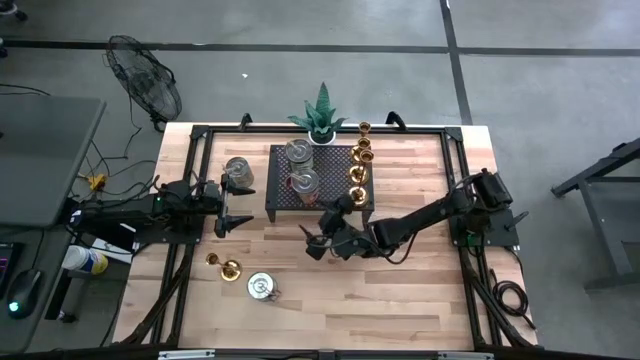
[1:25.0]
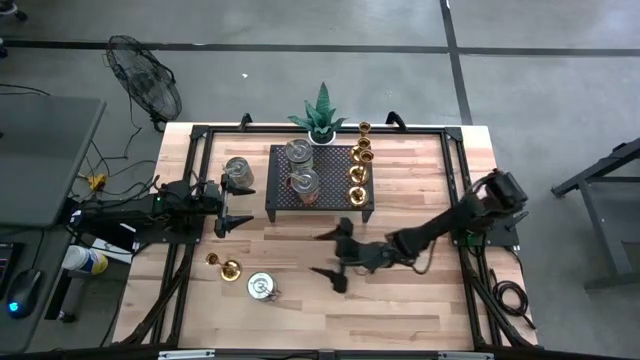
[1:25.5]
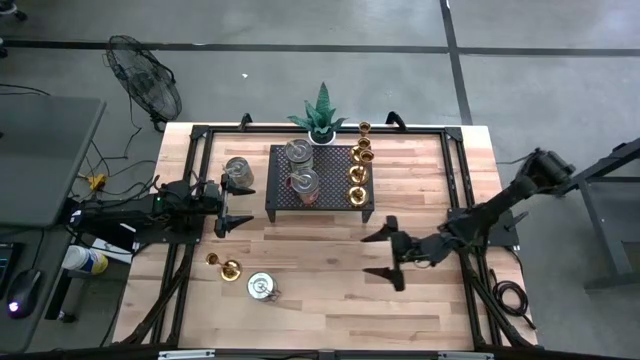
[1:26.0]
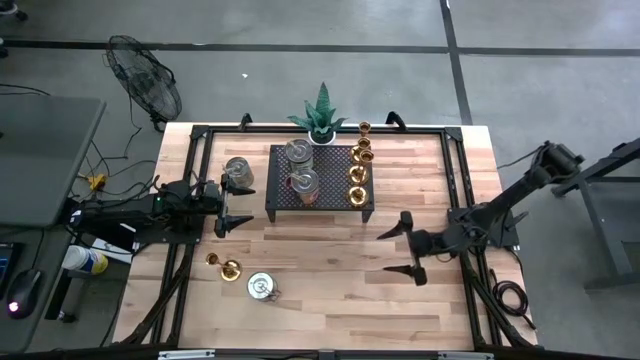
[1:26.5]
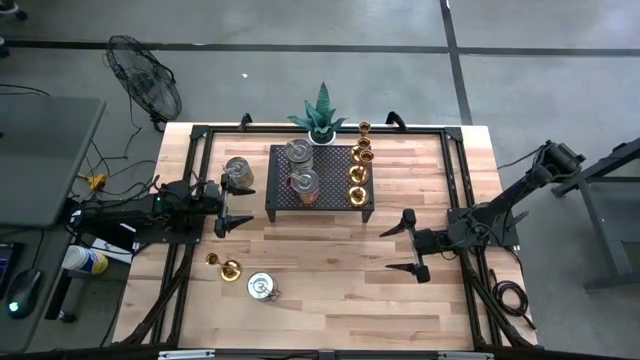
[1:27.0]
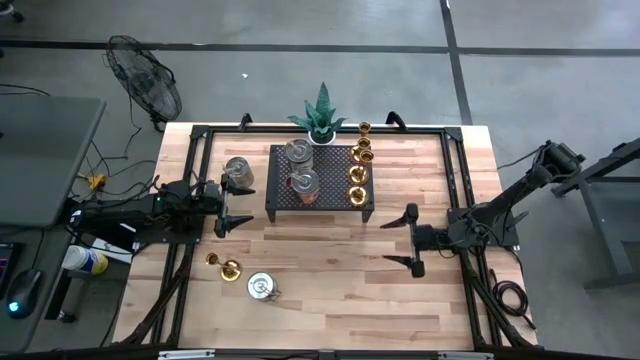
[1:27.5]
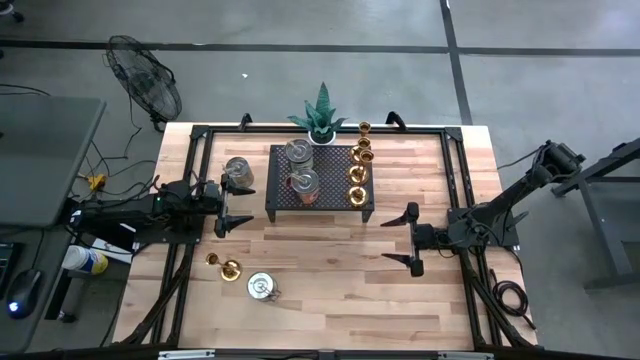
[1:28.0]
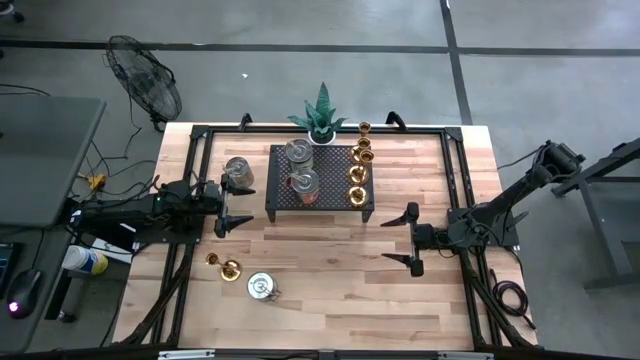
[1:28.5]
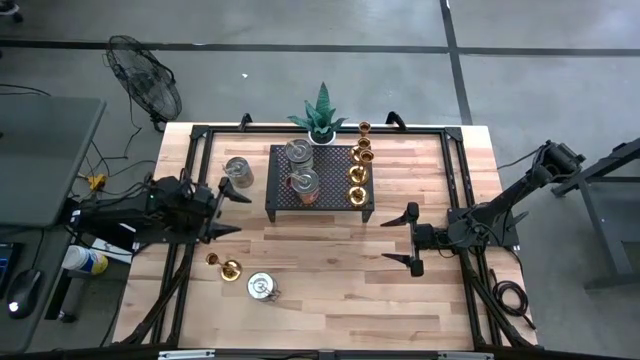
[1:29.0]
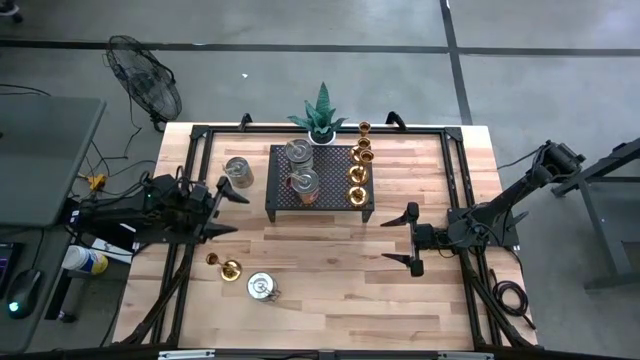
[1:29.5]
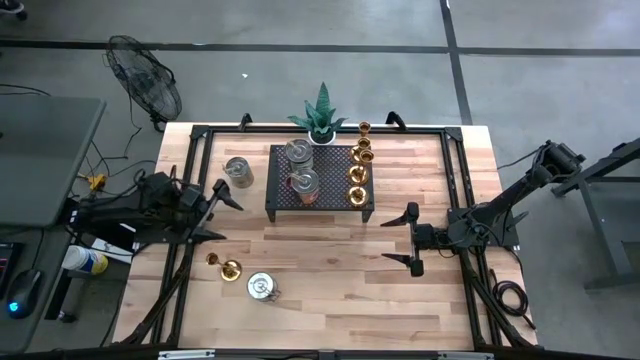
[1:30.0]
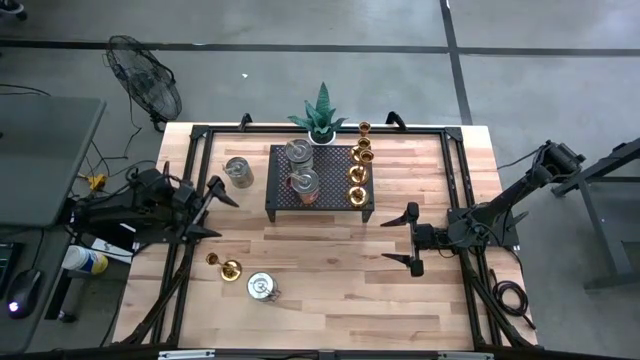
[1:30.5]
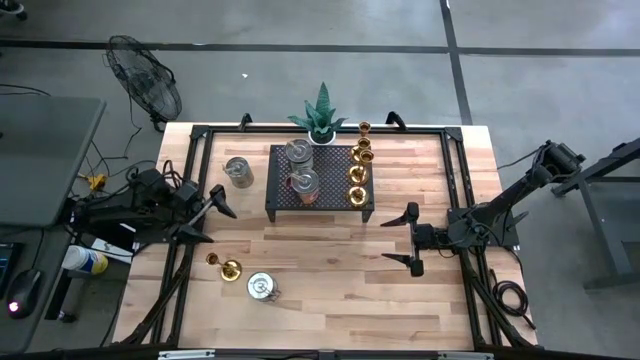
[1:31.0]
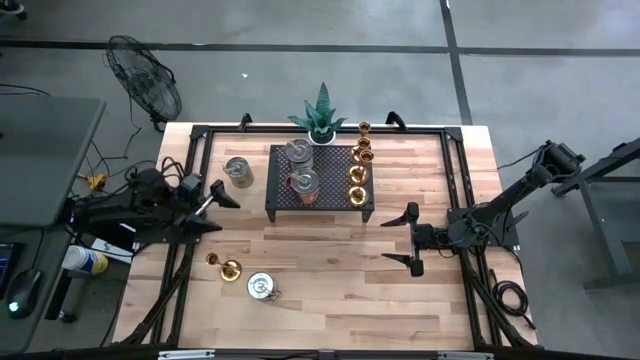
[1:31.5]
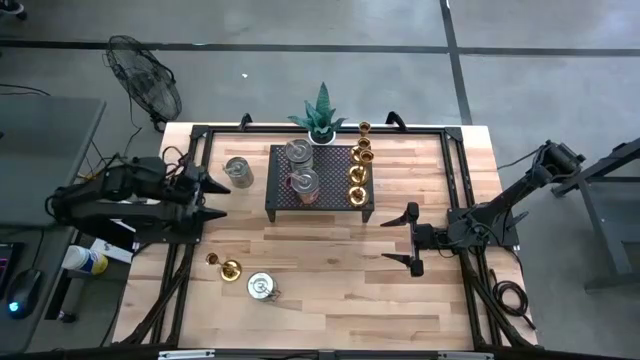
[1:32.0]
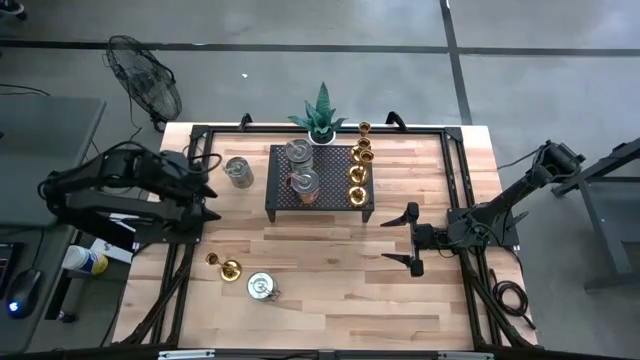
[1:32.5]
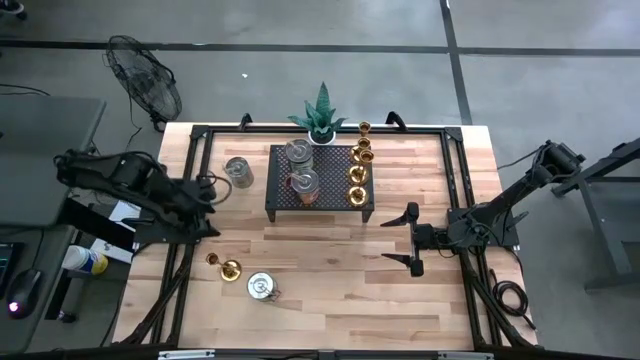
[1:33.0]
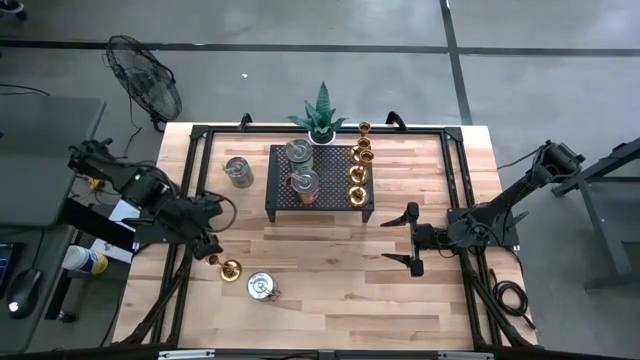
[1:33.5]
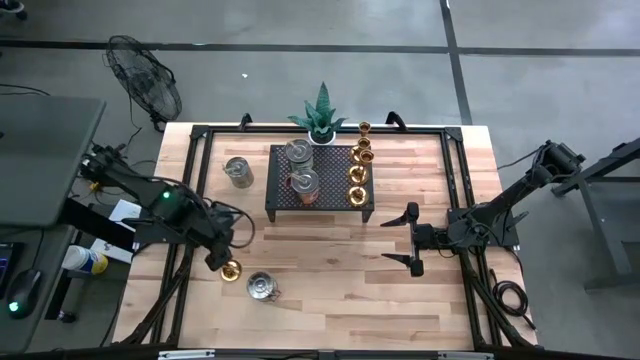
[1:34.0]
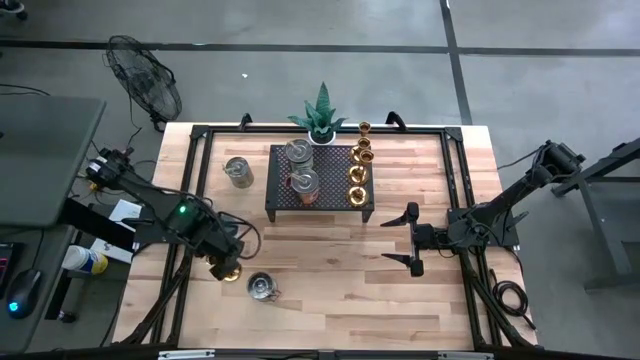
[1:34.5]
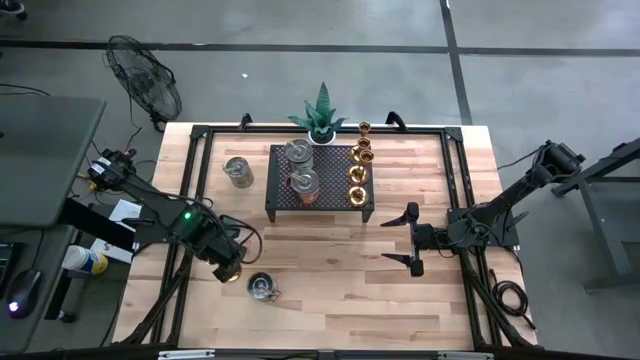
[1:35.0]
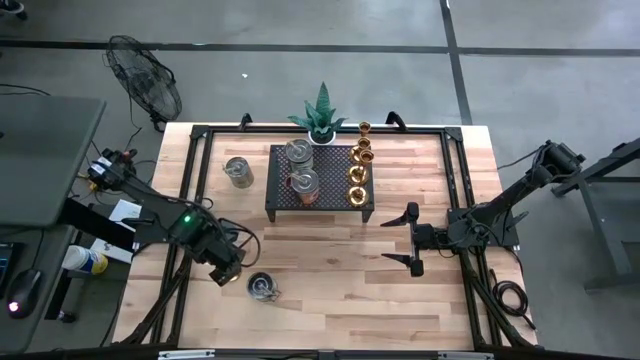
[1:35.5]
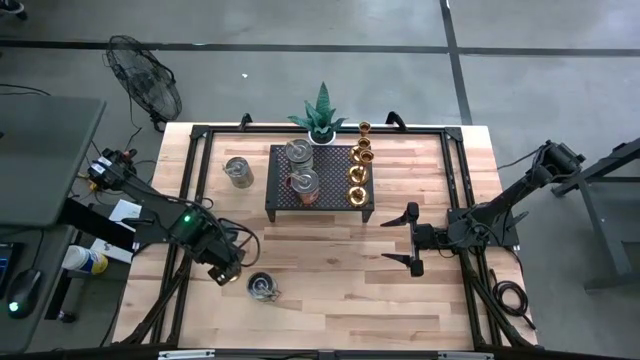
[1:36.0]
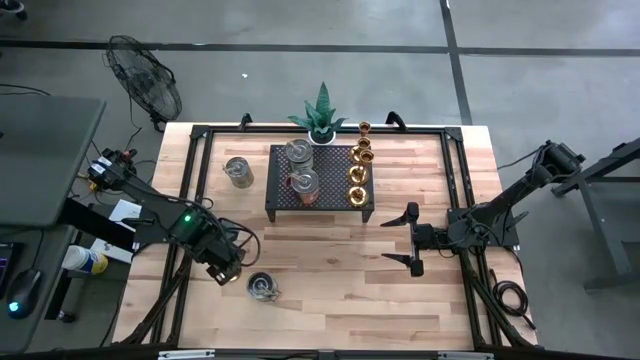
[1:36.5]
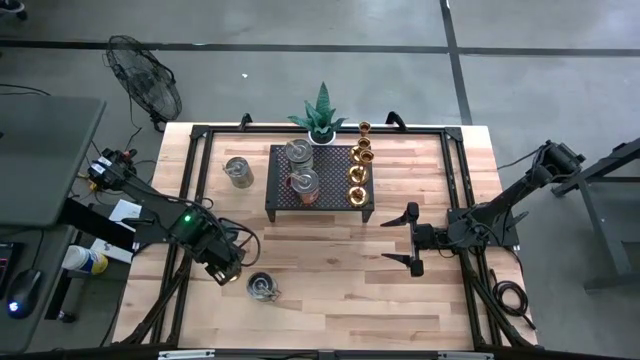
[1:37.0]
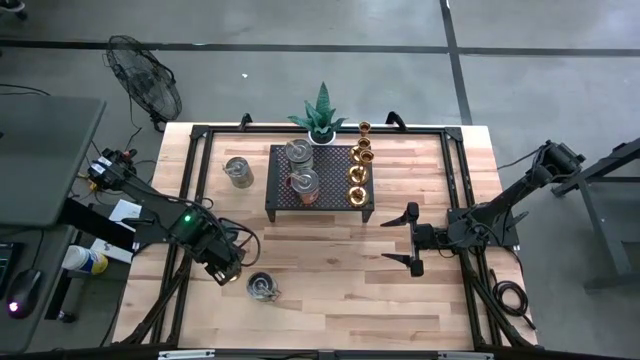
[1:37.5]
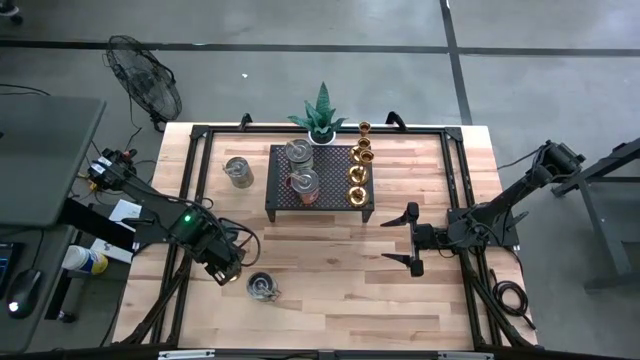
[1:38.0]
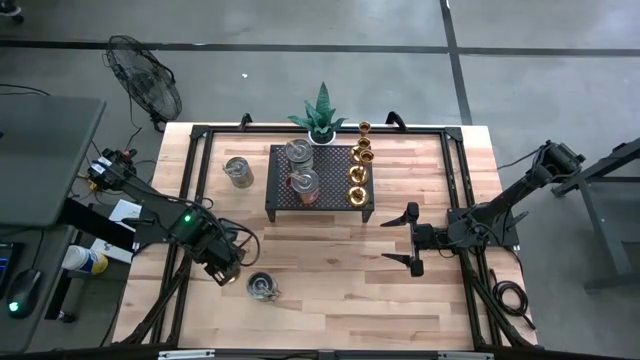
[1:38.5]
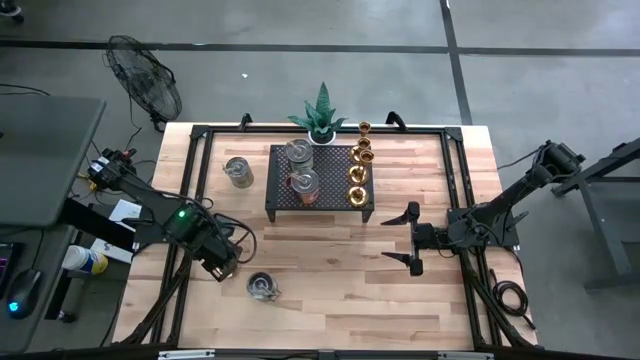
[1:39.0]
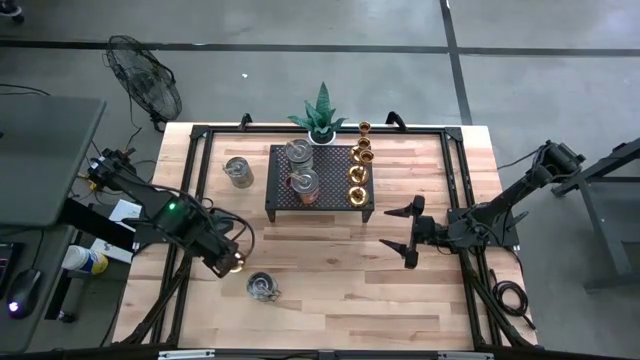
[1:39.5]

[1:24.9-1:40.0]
Task: Pick & Place candle stick holders
Put the gold candle holder on the shelf

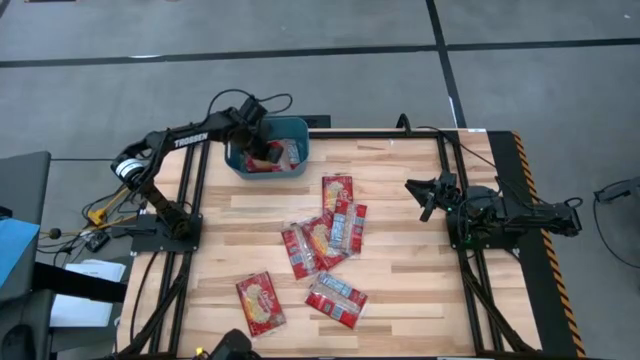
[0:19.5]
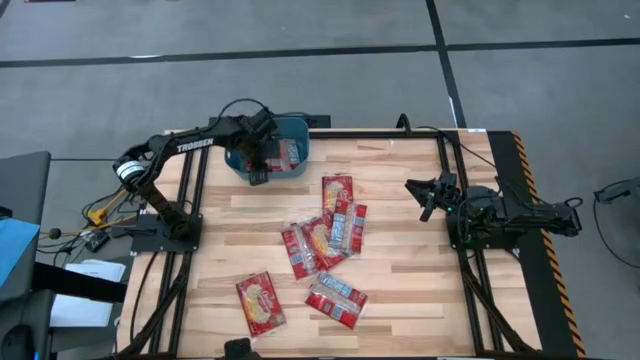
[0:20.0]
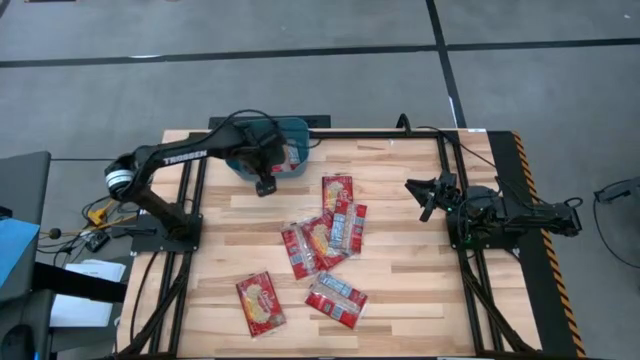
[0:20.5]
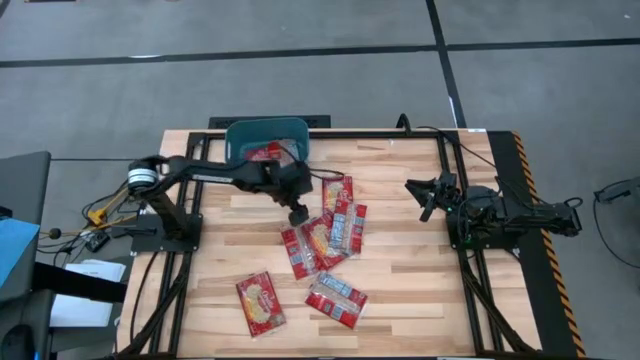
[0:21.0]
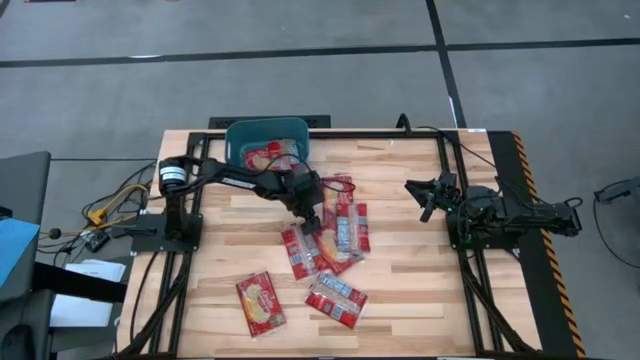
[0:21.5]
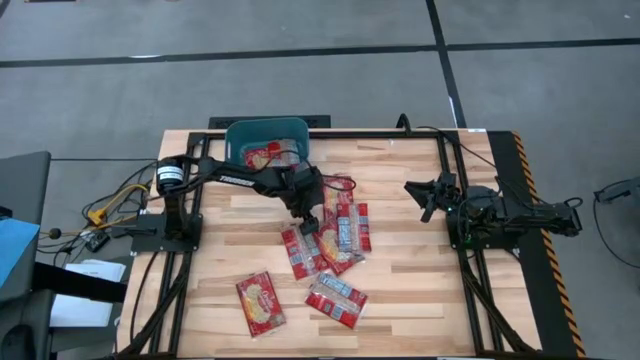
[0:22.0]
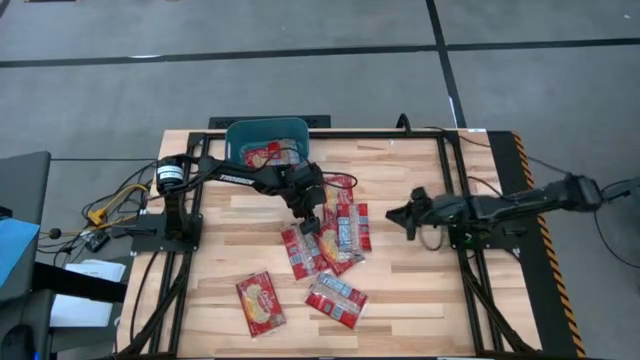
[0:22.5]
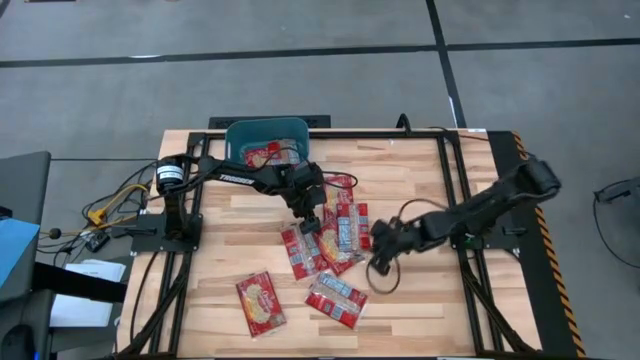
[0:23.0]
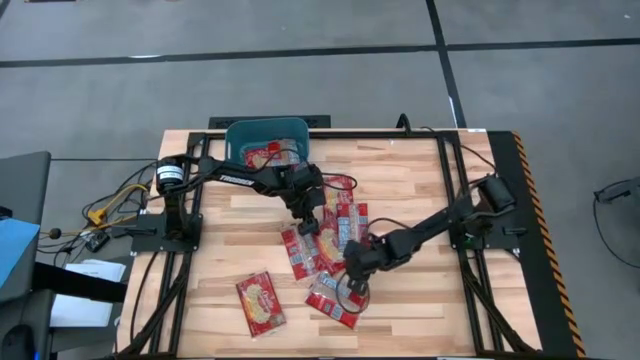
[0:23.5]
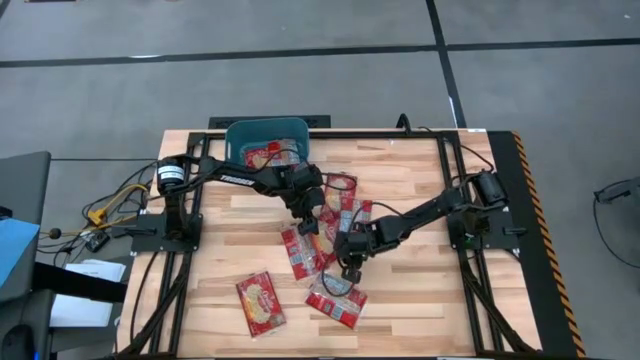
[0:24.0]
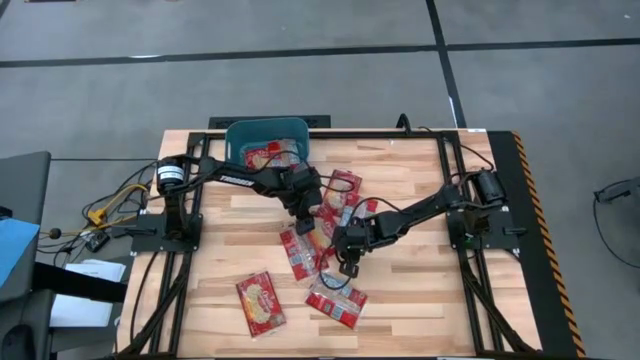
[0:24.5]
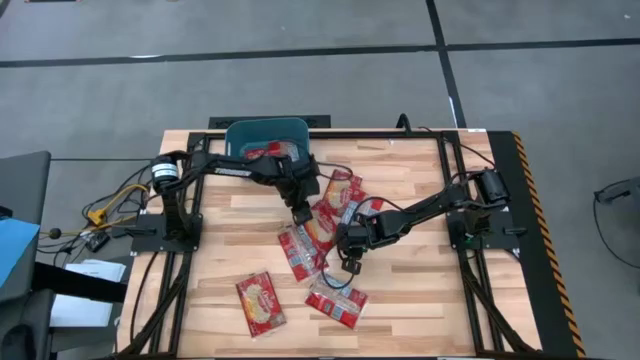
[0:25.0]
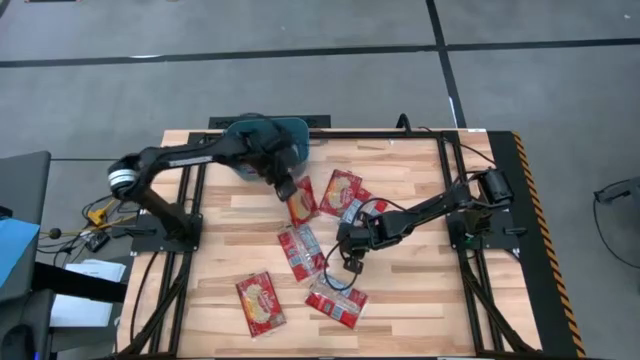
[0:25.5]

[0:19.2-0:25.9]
Task: Sort popcorn bags into baskets
Put the red popcorn bag into the blue bin
